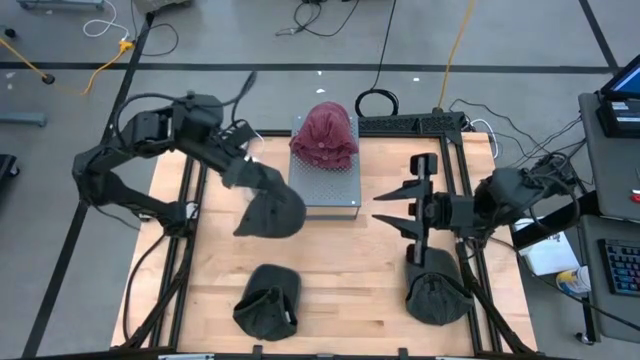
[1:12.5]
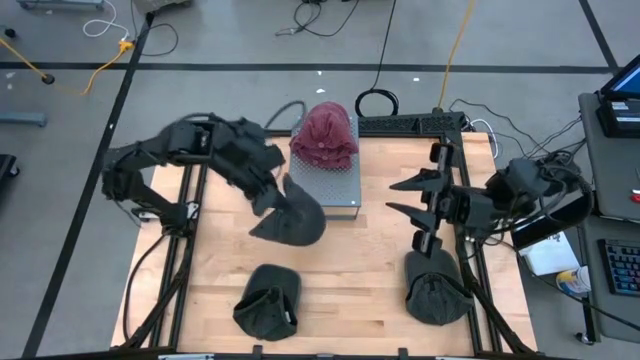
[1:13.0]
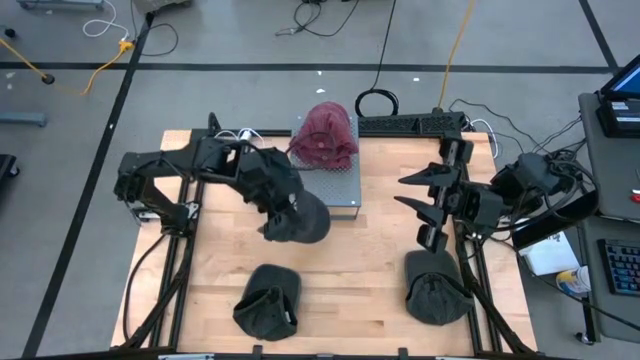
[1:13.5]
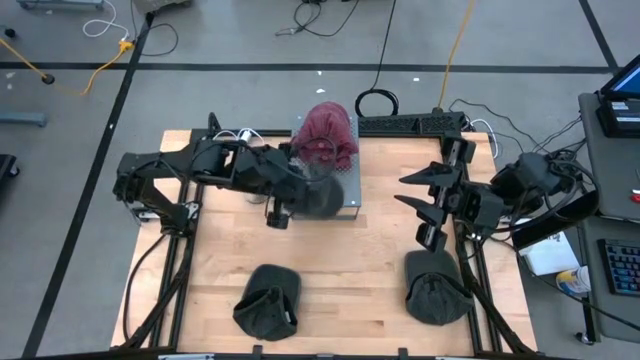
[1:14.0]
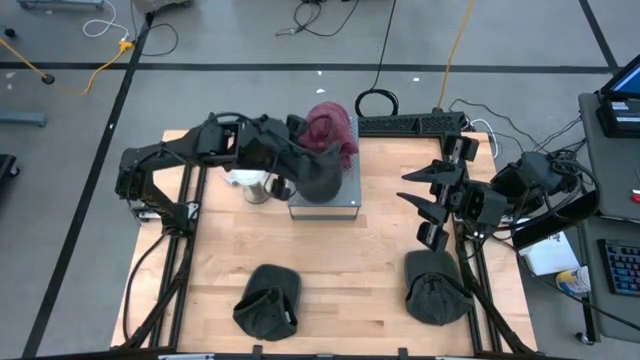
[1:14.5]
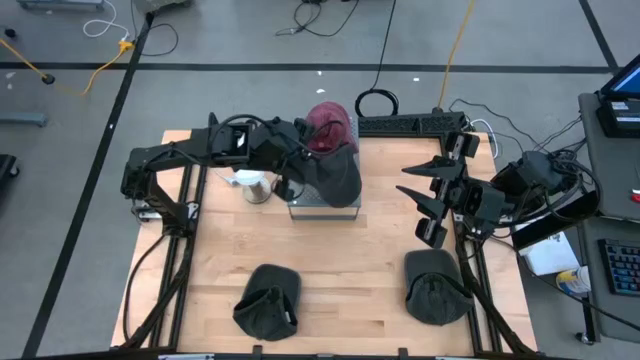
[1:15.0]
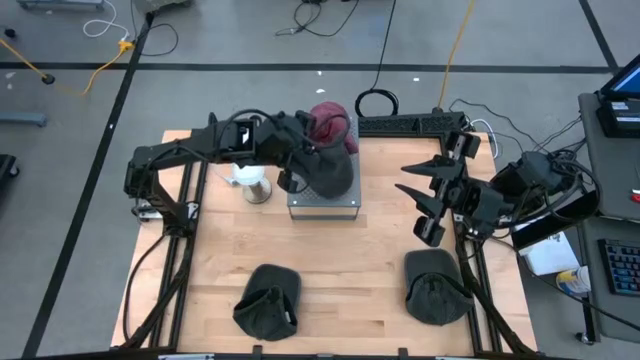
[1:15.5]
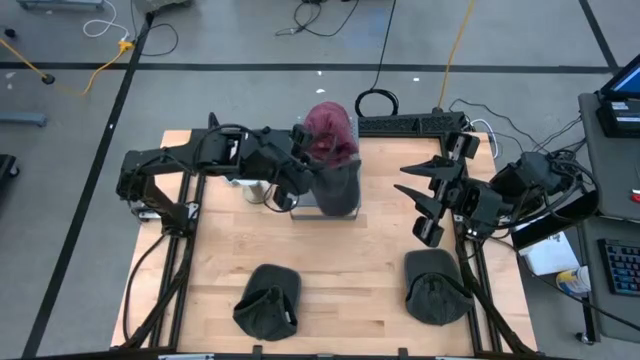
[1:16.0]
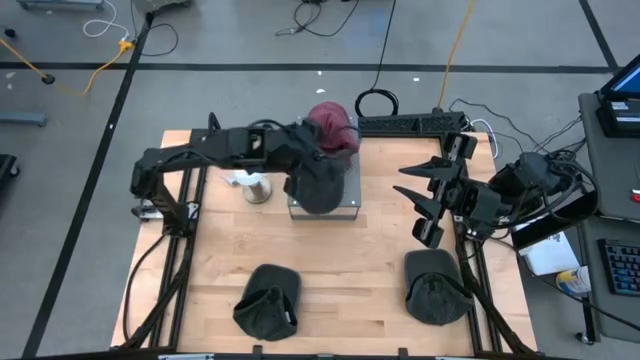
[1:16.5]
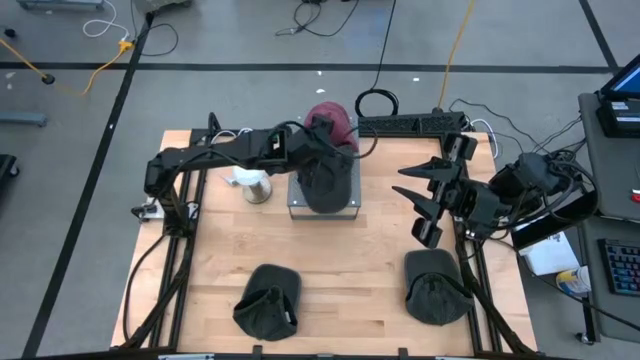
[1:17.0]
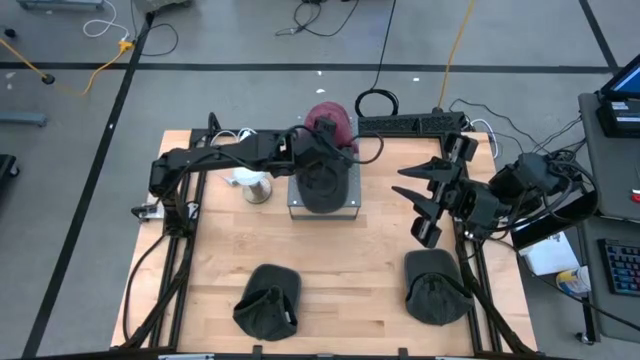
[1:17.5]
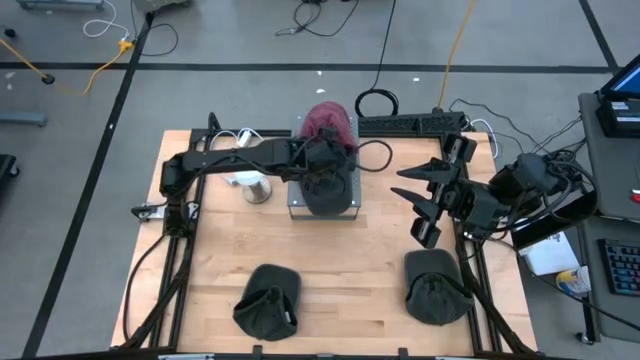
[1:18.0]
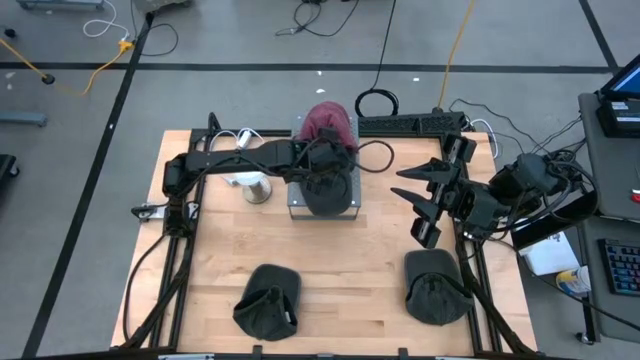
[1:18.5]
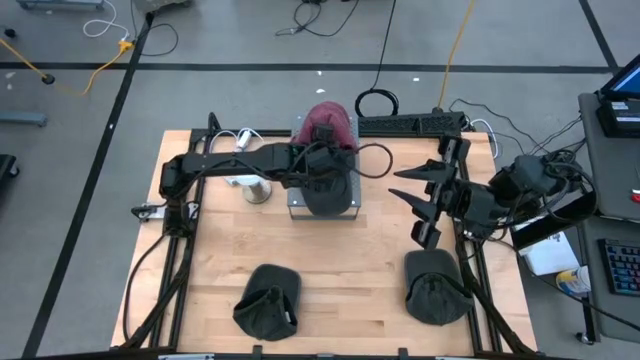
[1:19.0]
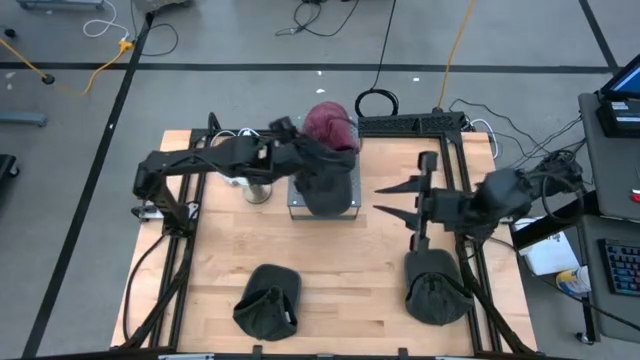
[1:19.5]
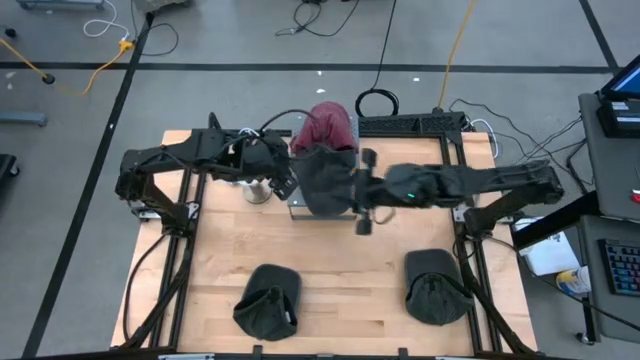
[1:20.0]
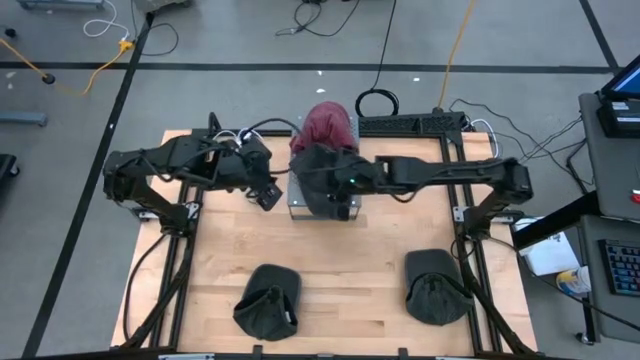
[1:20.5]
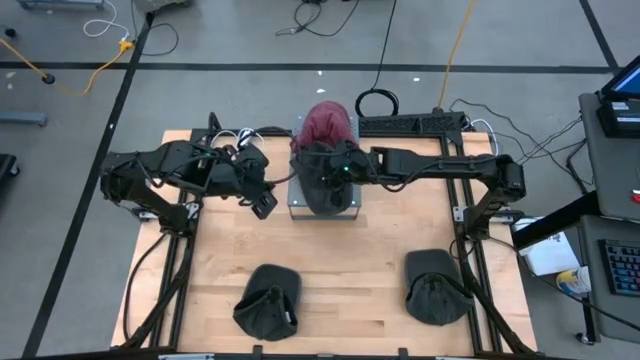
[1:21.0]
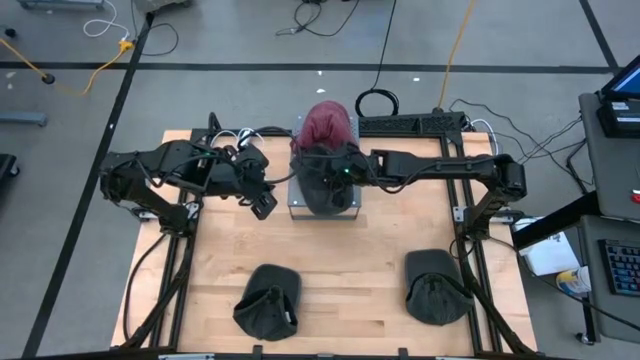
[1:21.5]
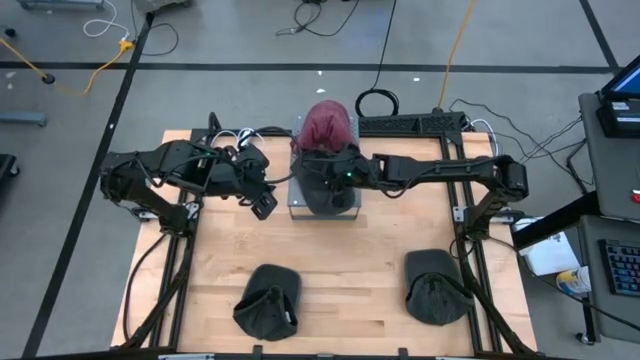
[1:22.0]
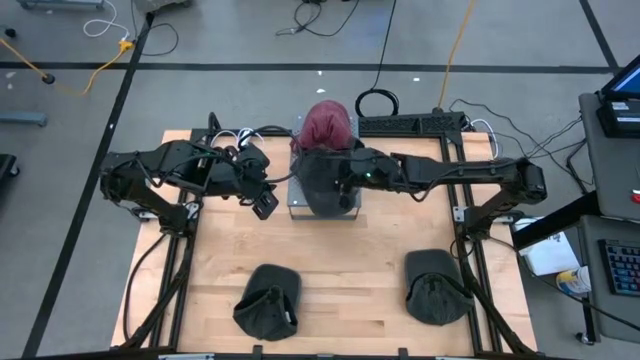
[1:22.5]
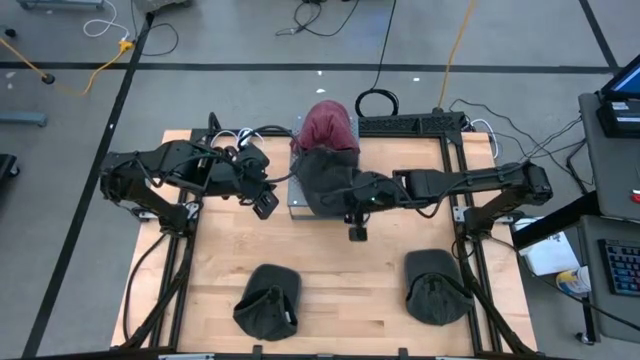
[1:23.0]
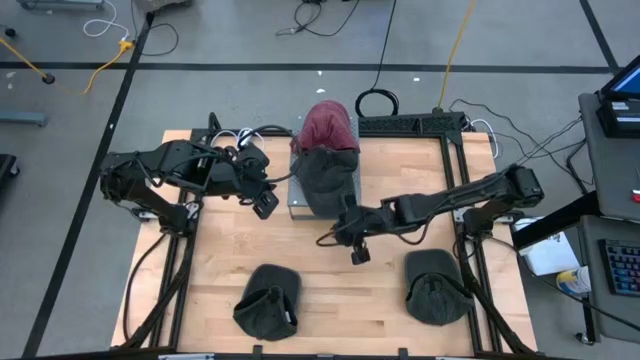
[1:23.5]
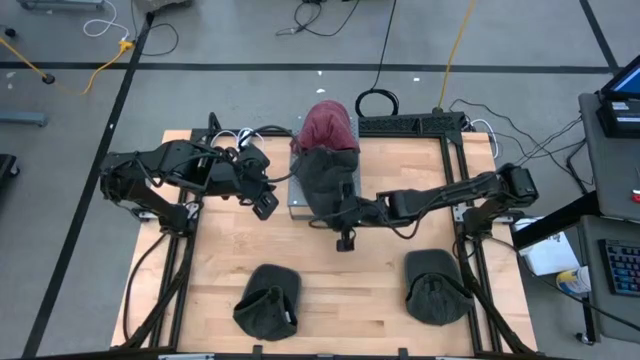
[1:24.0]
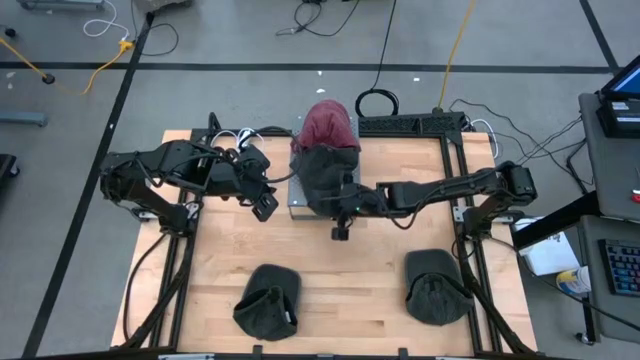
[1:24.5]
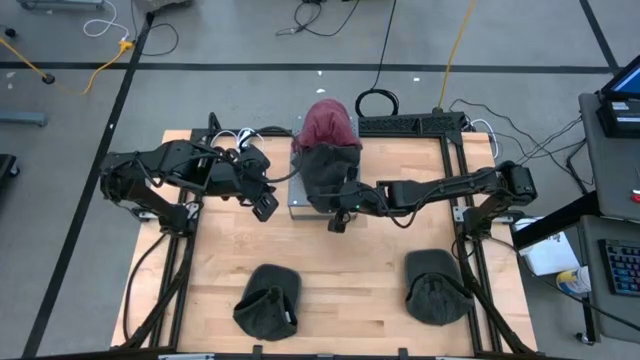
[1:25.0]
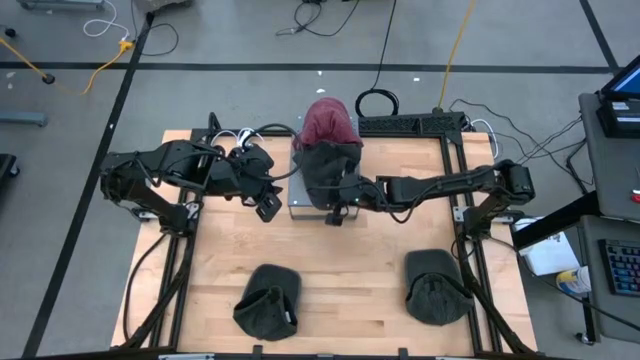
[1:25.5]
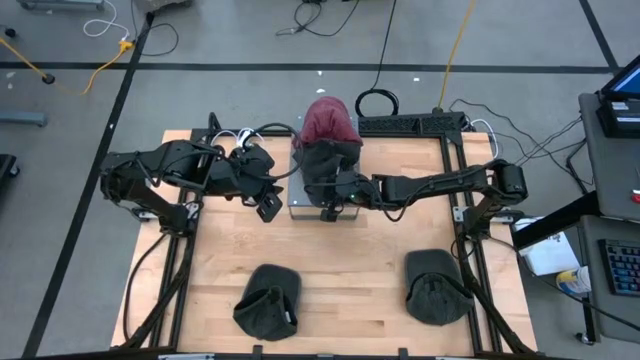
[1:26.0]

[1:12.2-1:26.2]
Task: Pick & Place hat
Put the top right black cap on the shelf

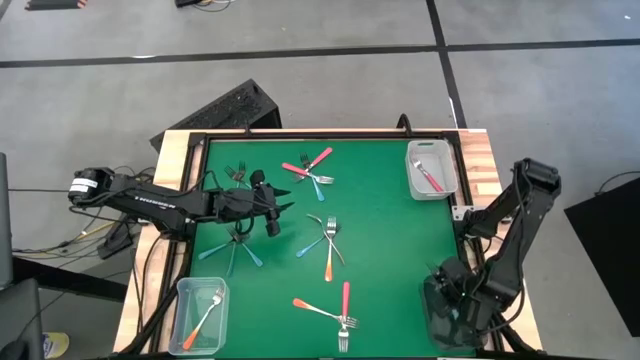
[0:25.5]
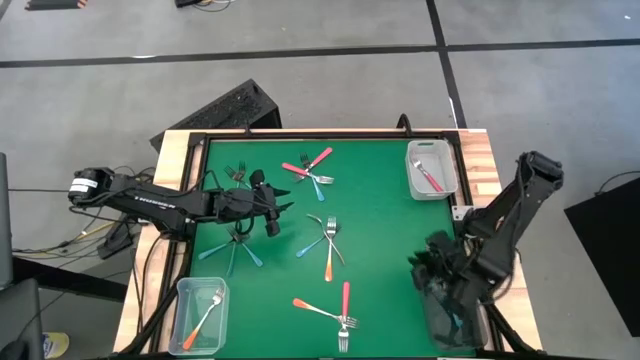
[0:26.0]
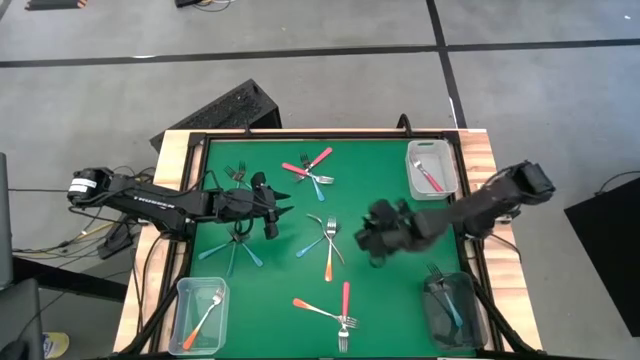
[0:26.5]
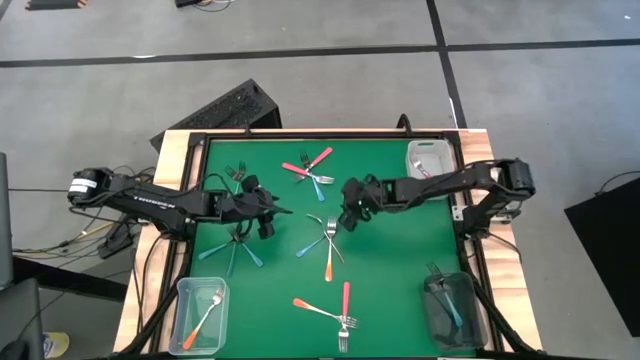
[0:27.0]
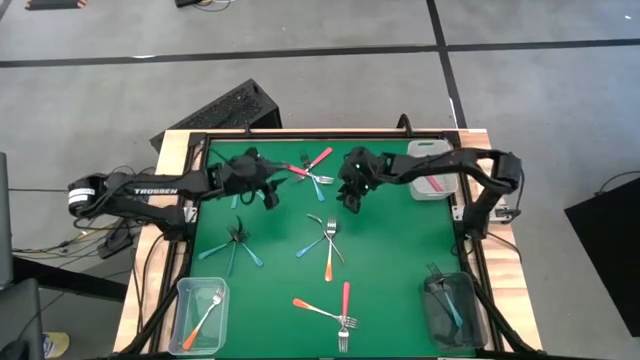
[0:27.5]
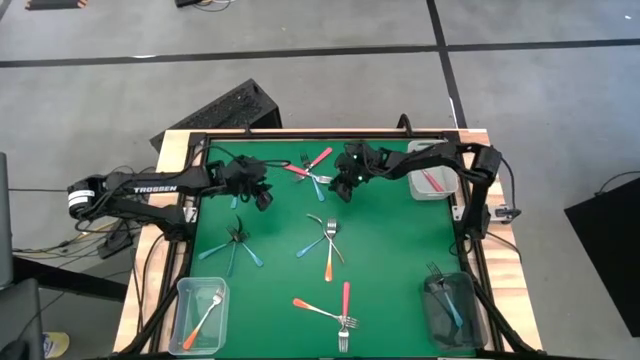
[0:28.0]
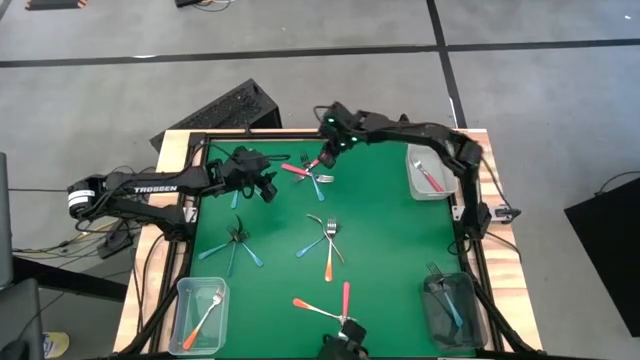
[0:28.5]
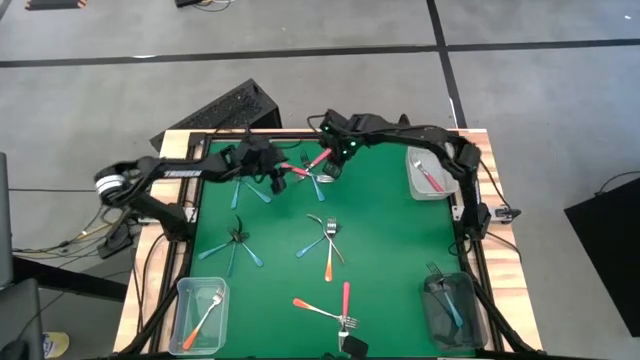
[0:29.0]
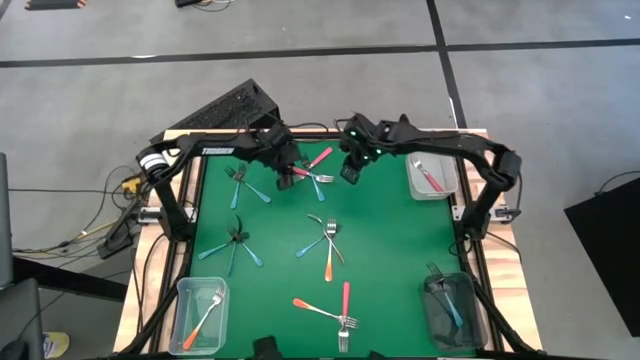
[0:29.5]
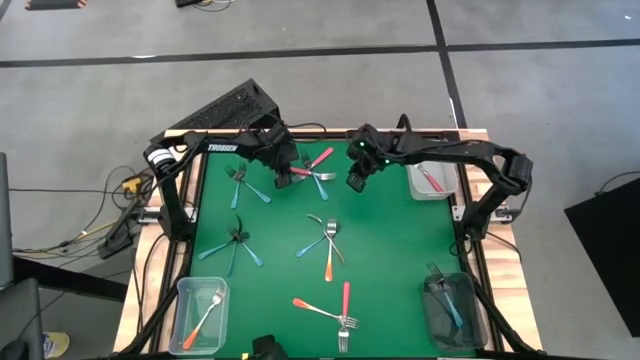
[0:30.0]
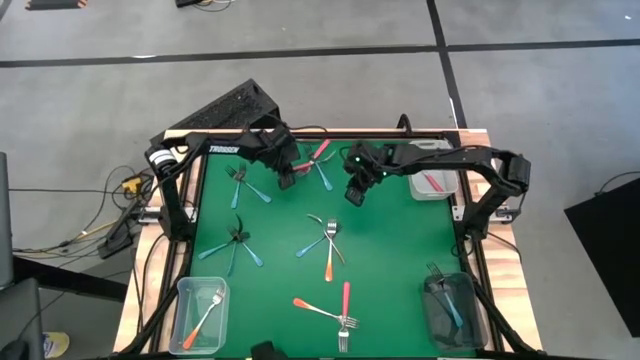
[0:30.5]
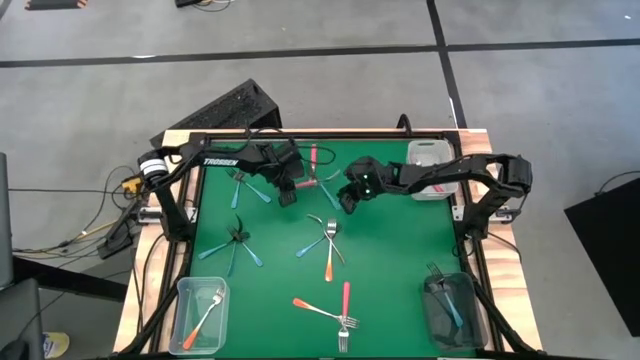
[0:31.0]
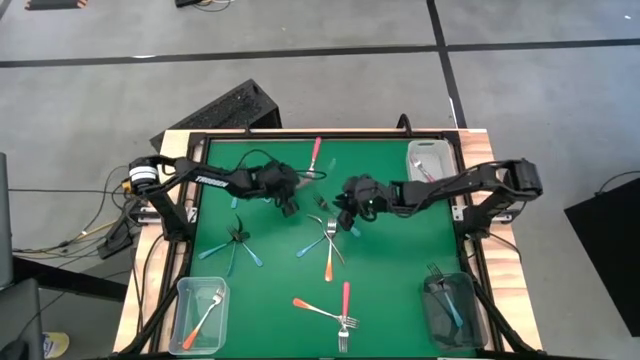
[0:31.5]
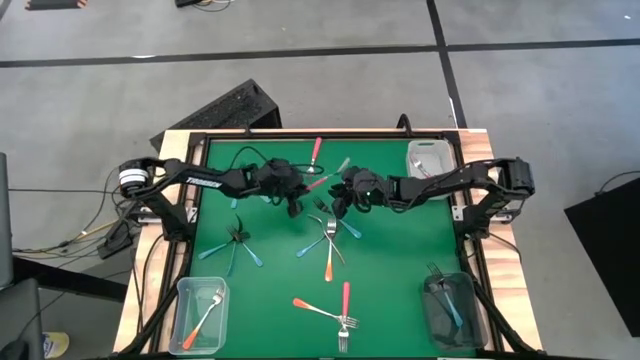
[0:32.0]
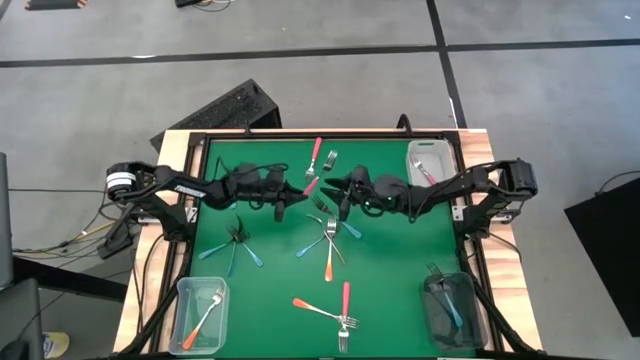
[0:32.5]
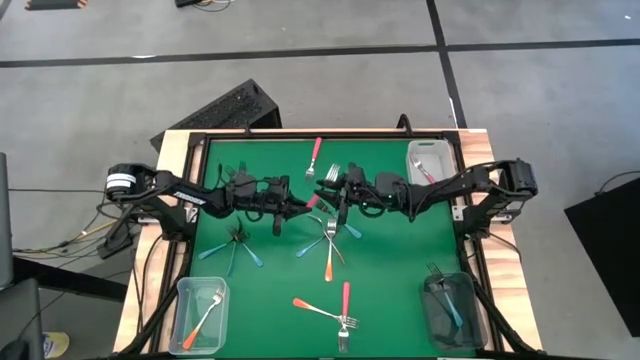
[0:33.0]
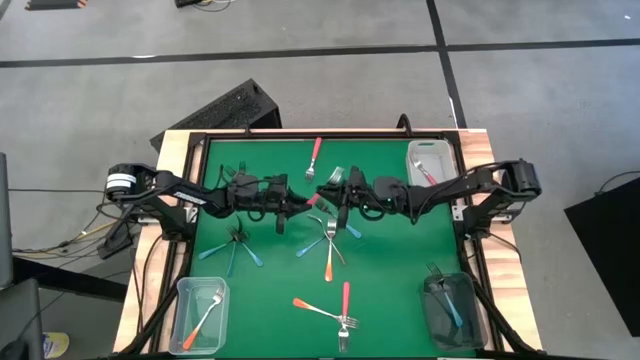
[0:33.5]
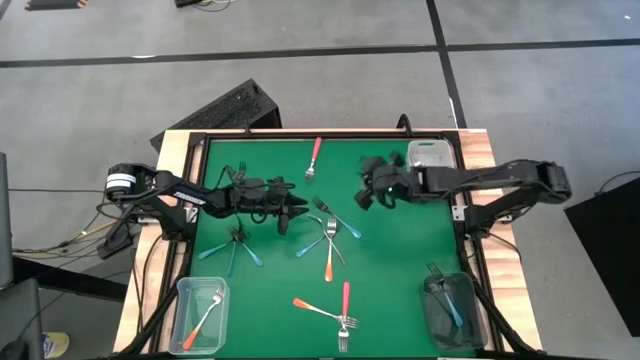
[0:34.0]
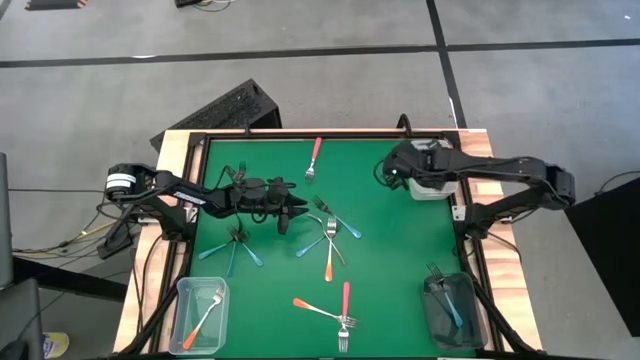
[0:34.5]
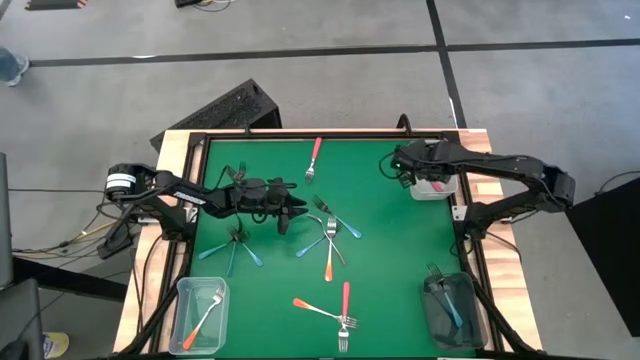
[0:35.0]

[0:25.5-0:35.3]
Task: Sort silverware by color (type)
Put the pink fork into the white bin
